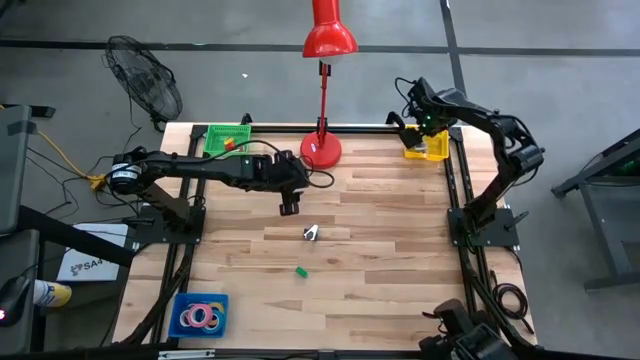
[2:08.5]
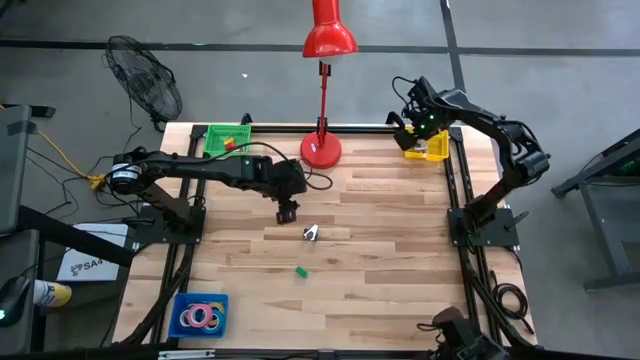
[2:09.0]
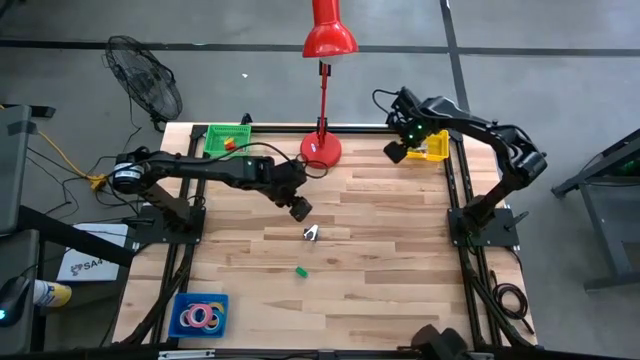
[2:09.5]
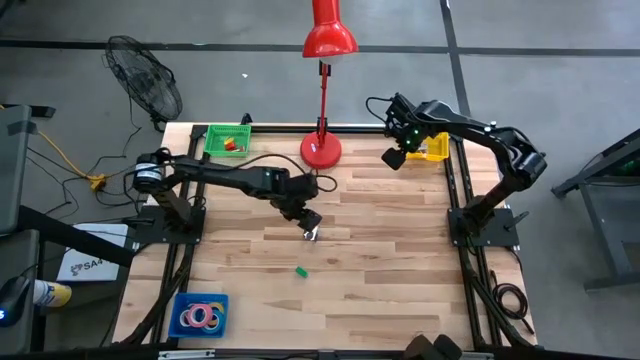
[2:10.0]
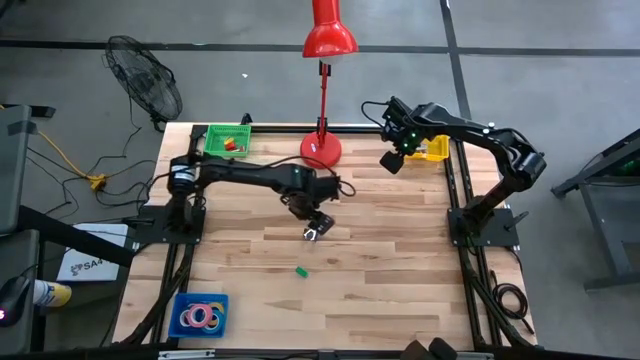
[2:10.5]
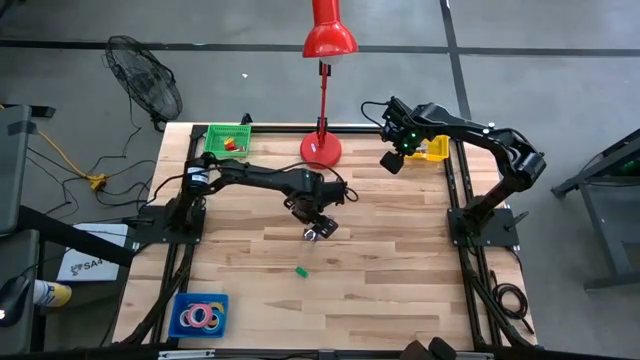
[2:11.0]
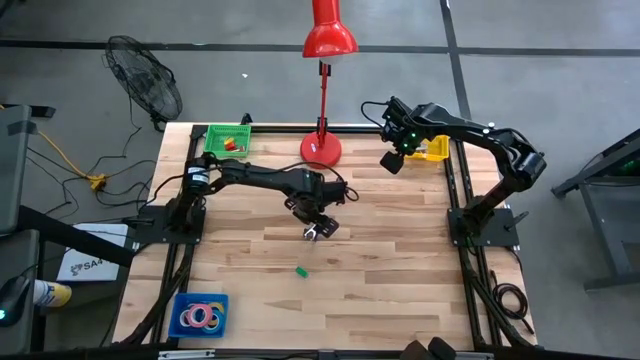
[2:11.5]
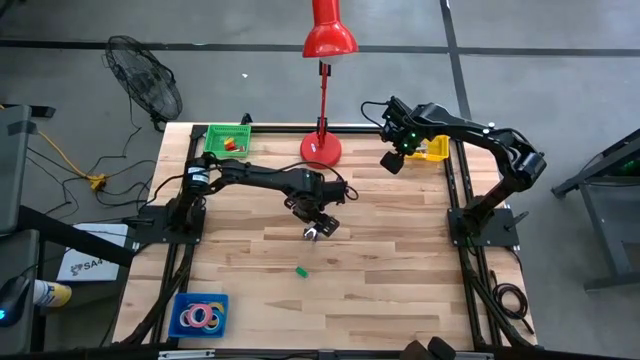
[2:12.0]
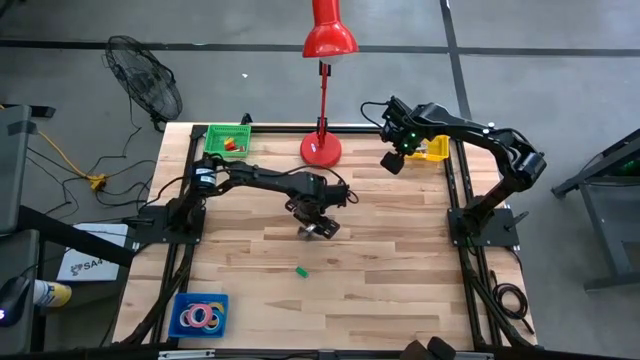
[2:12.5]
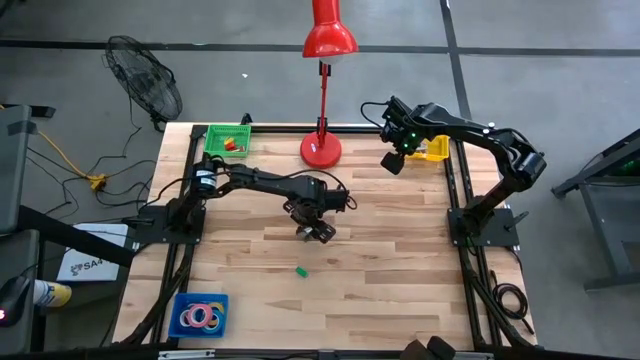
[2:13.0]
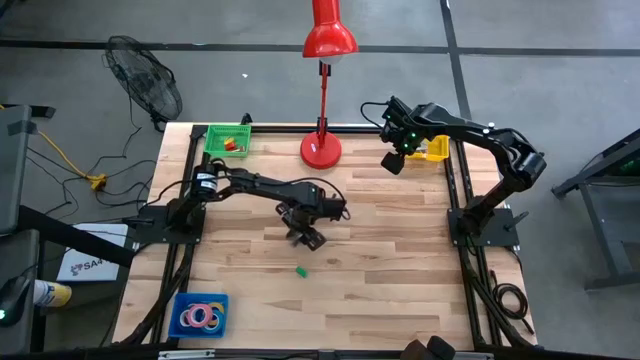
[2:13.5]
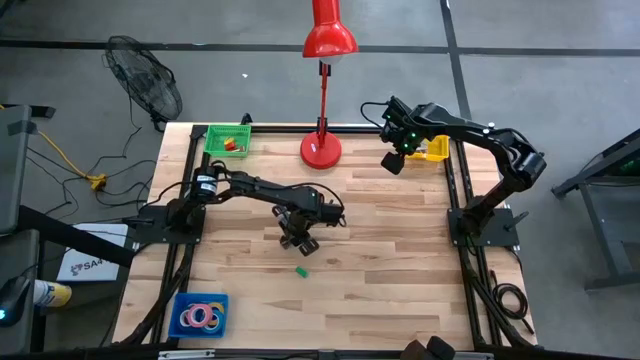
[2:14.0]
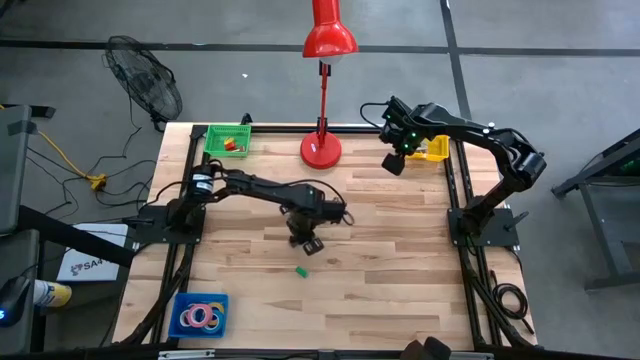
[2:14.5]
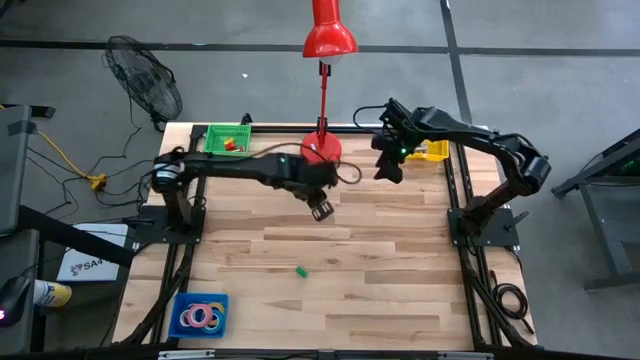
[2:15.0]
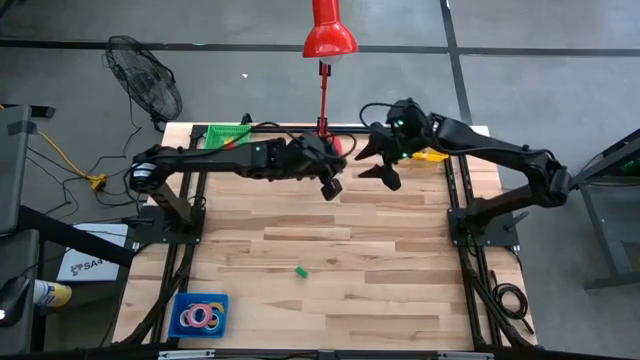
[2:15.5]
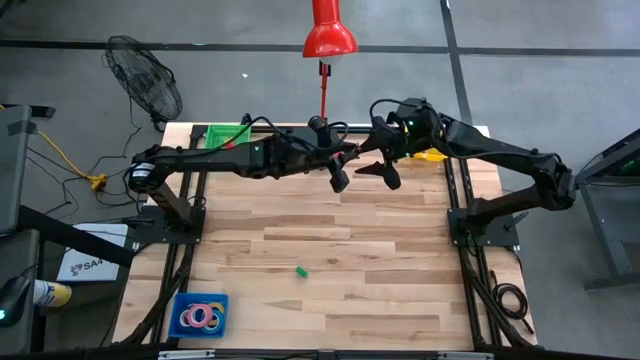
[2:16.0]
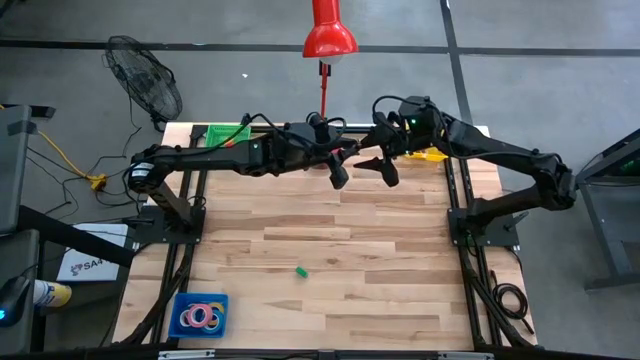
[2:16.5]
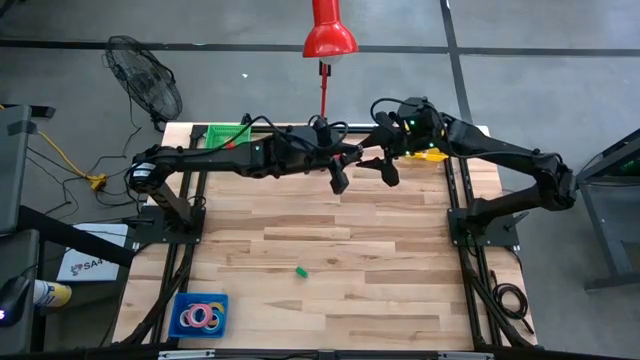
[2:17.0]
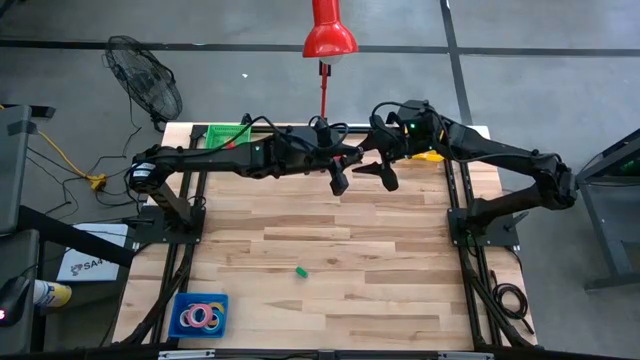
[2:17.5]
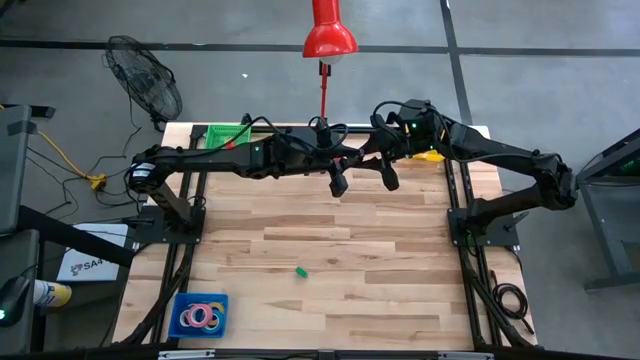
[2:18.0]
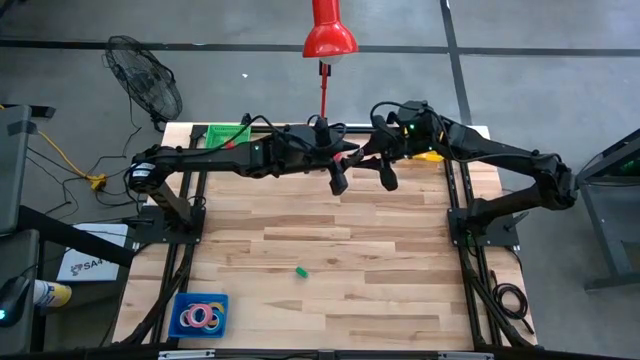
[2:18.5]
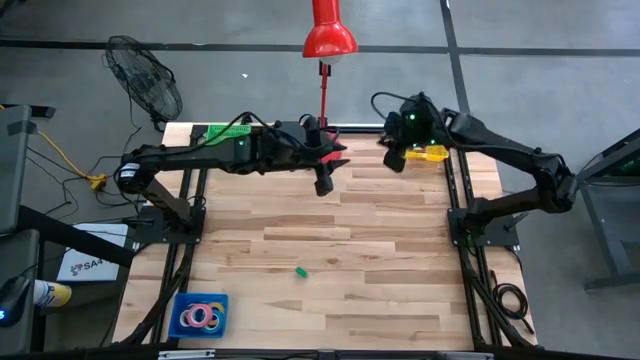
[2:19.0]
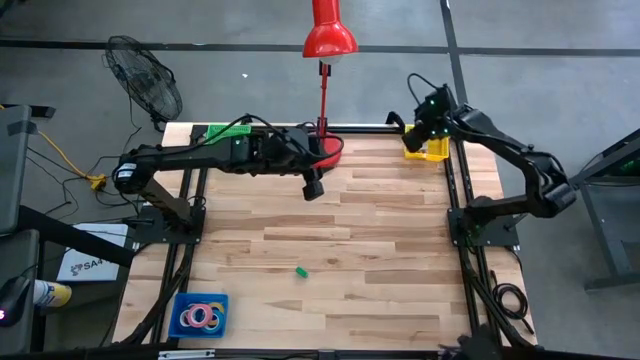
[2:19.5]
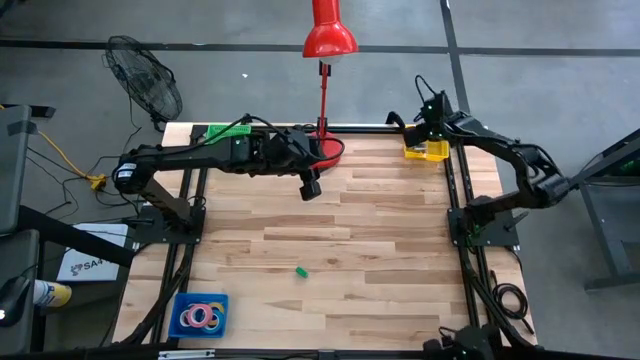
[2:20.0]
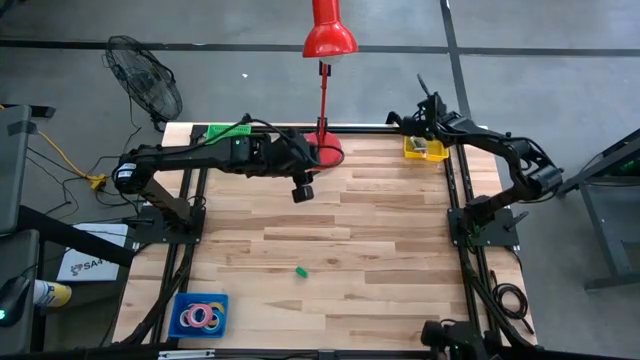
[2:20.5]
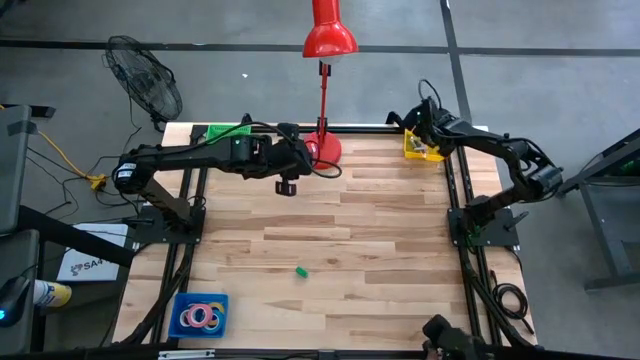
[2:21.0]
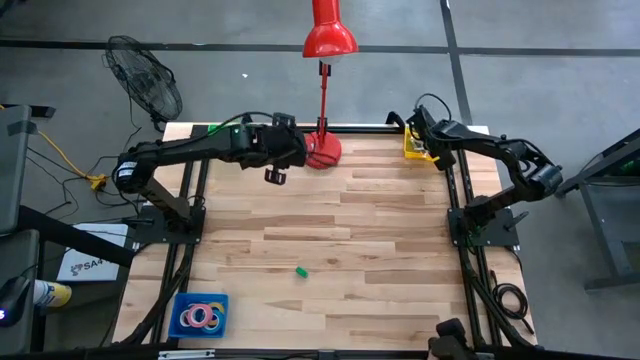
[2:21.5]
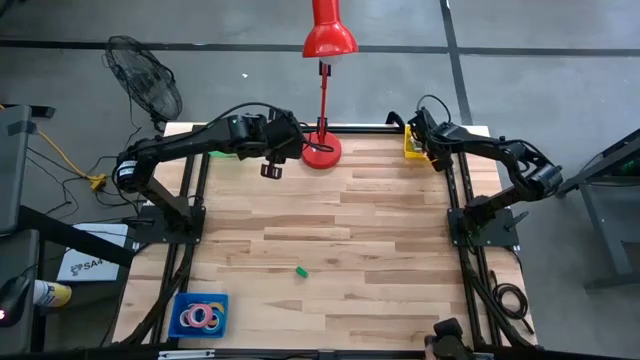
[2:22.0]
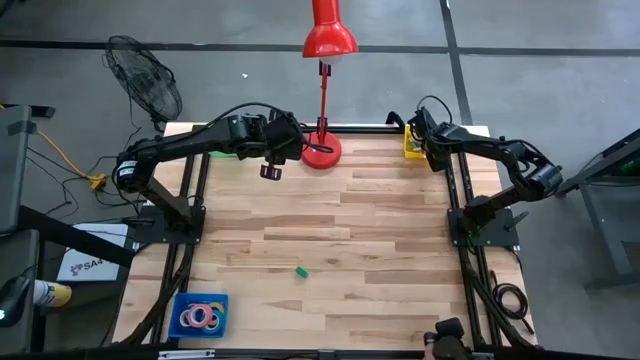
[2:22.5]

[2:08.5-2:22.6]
Task: Pick and place Stapler, Stapler remover, tape
Put the dark gray staple remover into the yellow basket

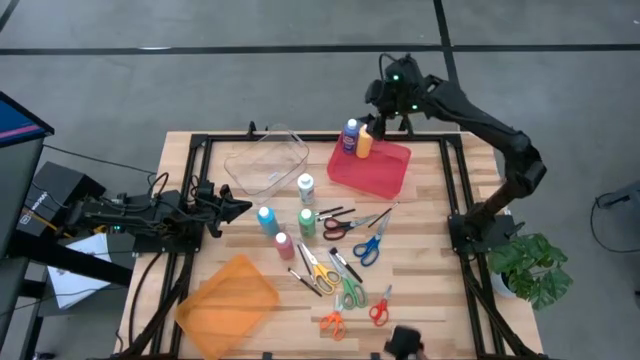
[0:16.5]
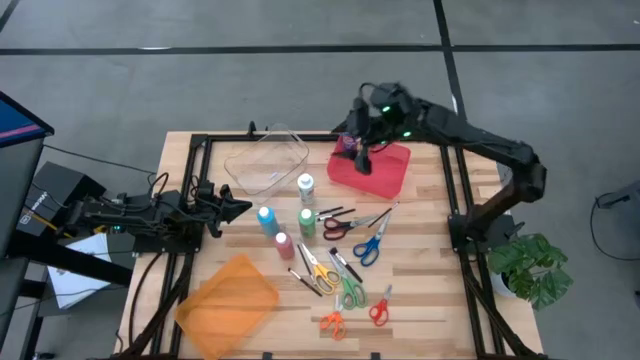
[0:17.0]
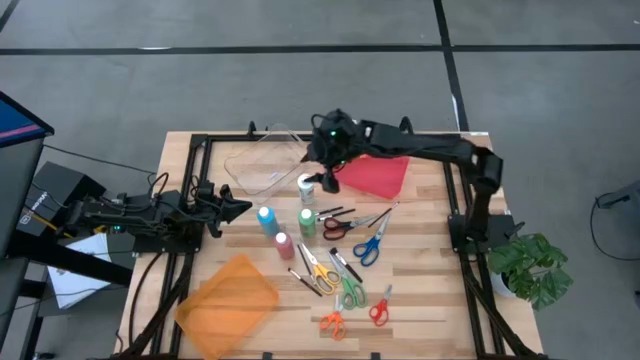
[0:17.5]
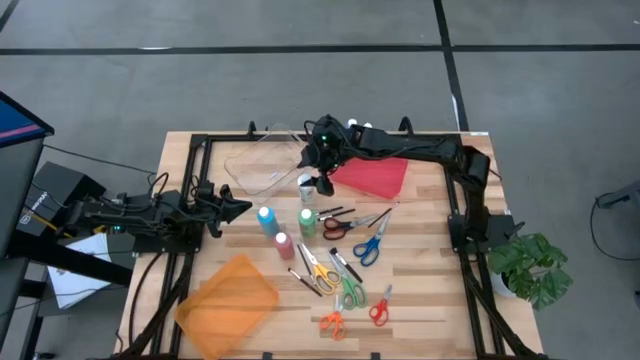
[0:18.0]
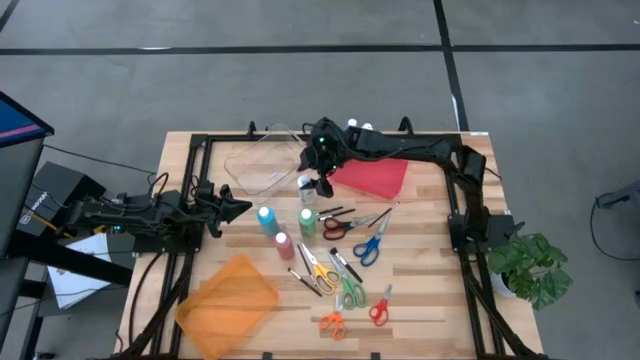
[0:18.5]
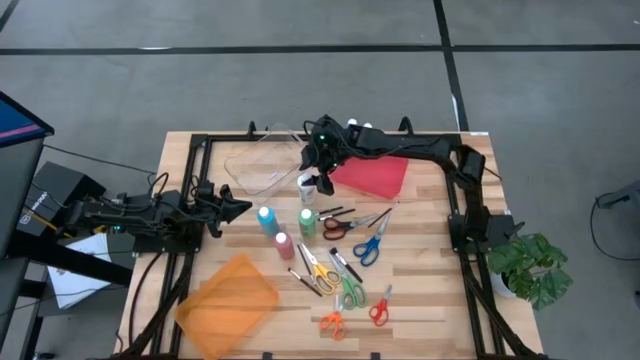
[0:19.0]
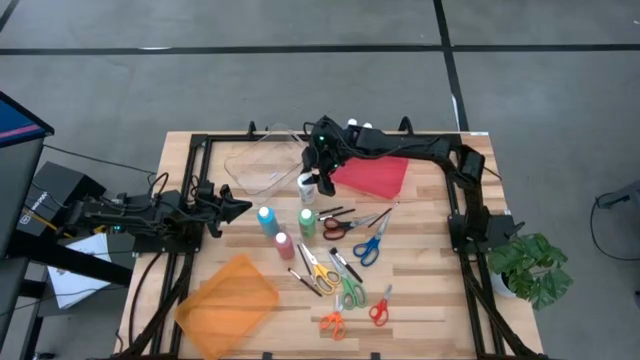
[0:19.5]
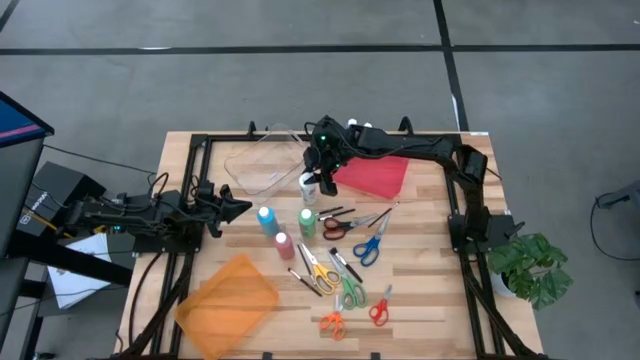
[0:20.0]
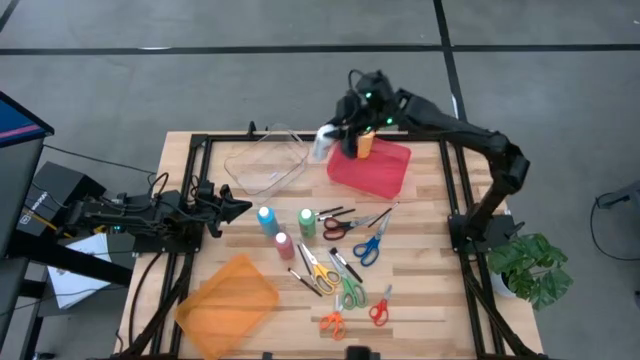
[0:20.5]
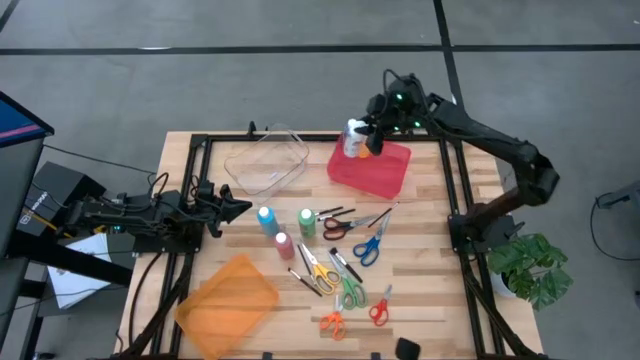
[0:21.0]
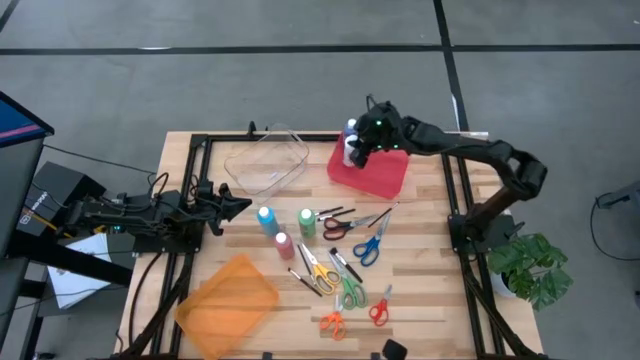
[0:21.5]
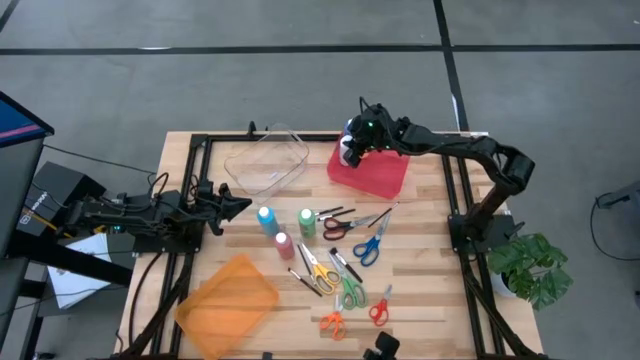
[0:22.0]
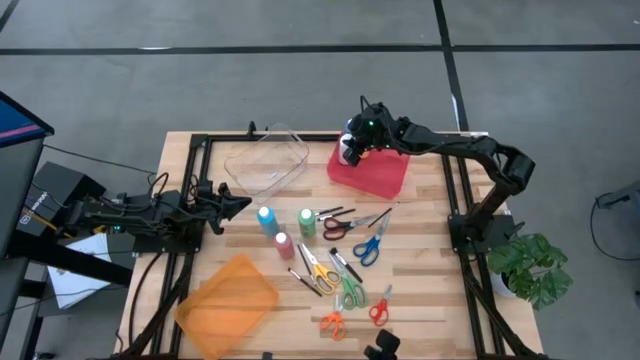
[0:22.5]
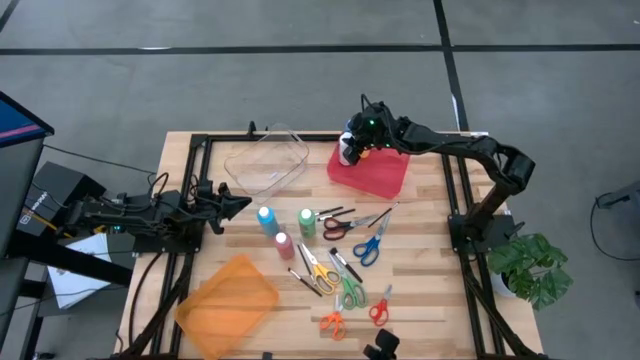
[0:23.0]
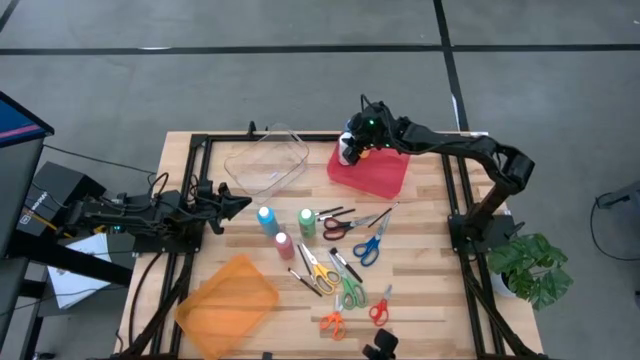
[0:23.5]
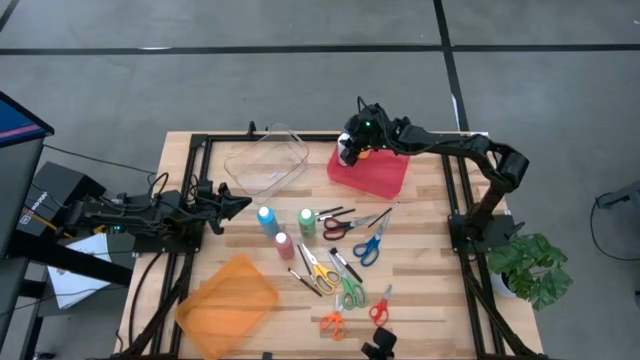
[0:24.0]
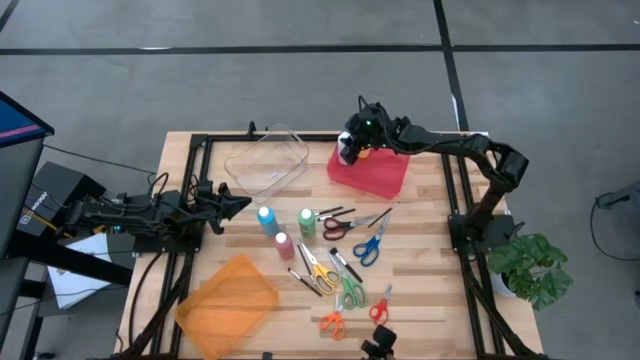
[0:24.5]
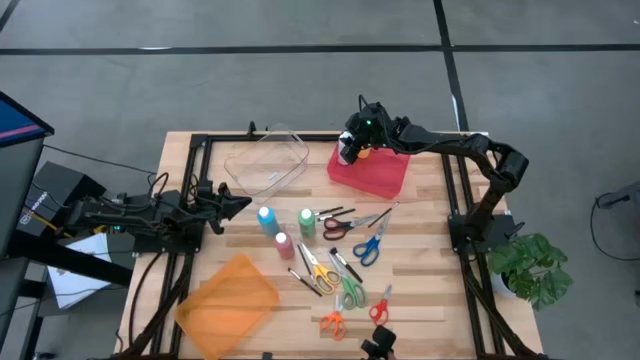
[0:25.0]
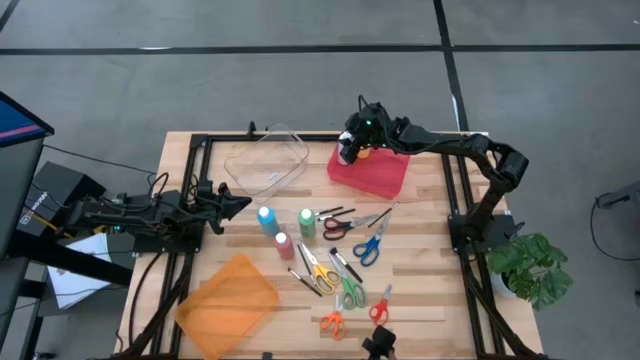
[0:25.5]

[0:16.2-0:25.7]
Task: Pick & Place Paint Supplies
Put the white paint bottle into the red bin
